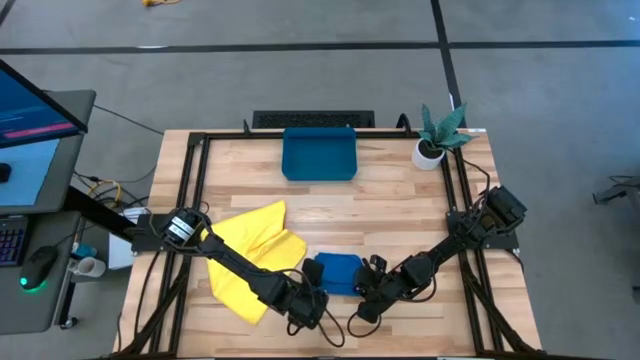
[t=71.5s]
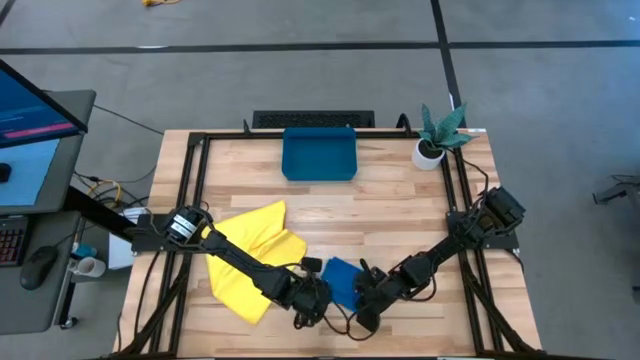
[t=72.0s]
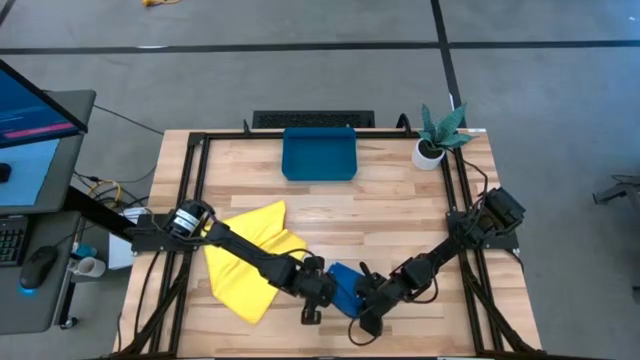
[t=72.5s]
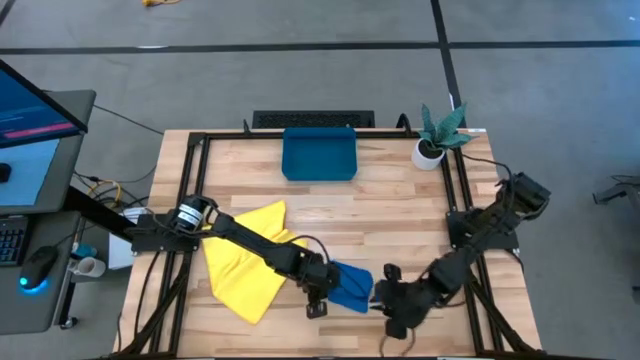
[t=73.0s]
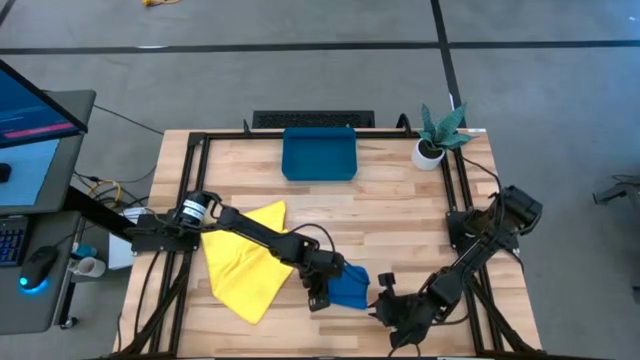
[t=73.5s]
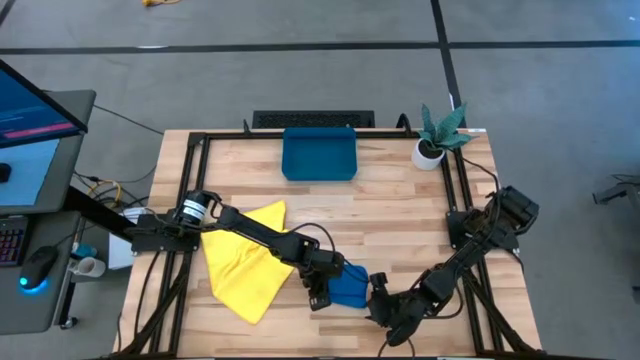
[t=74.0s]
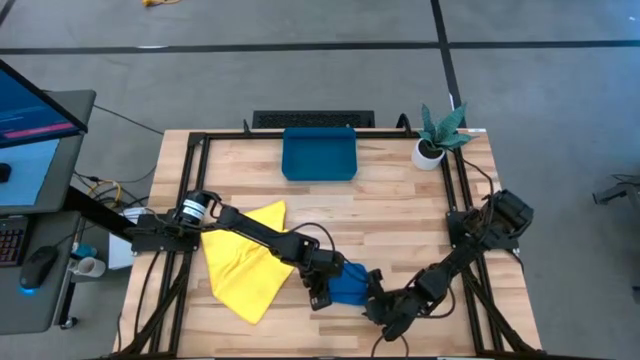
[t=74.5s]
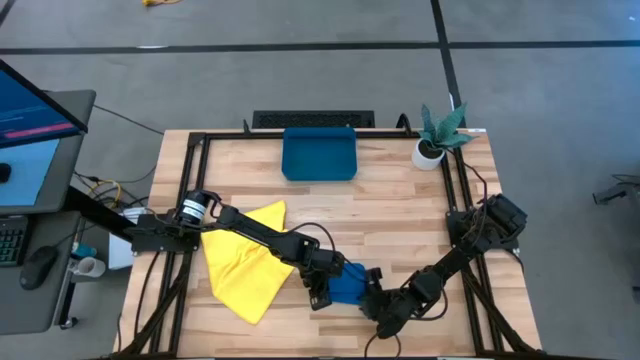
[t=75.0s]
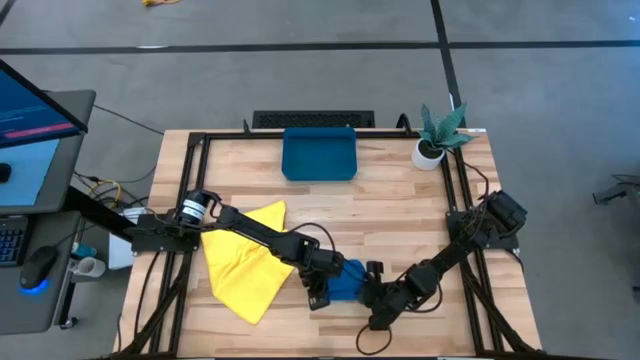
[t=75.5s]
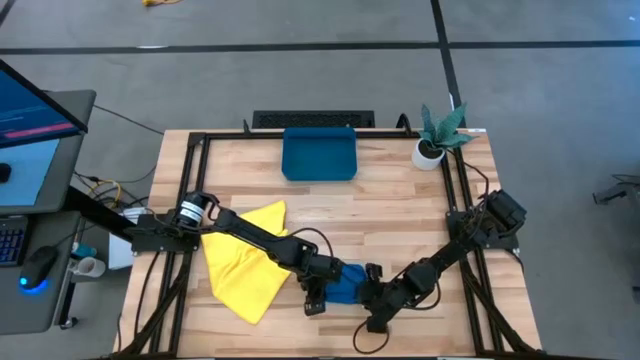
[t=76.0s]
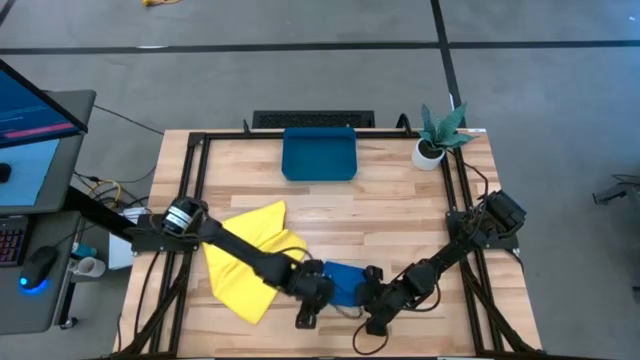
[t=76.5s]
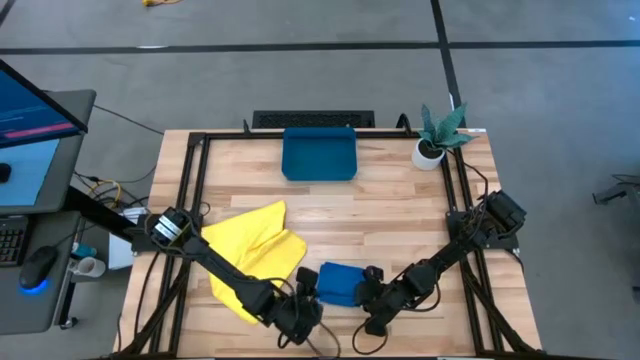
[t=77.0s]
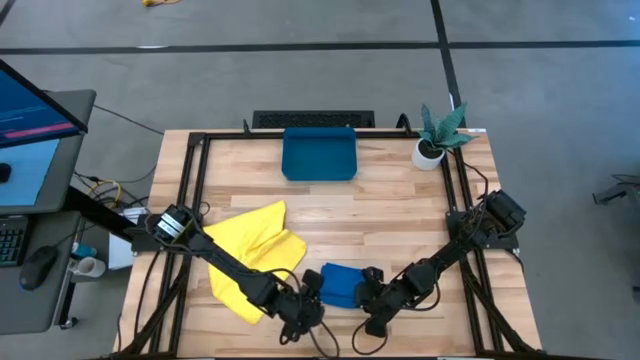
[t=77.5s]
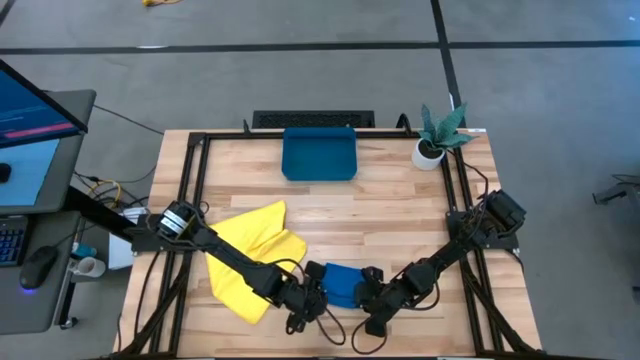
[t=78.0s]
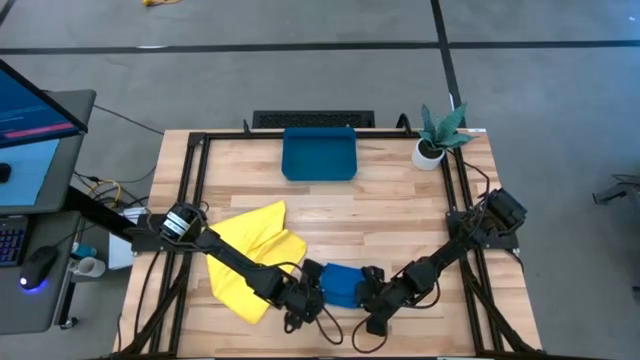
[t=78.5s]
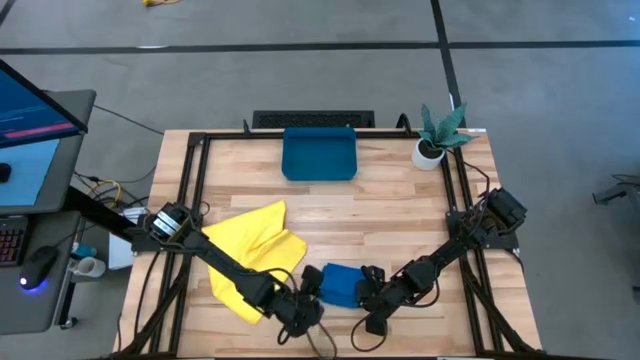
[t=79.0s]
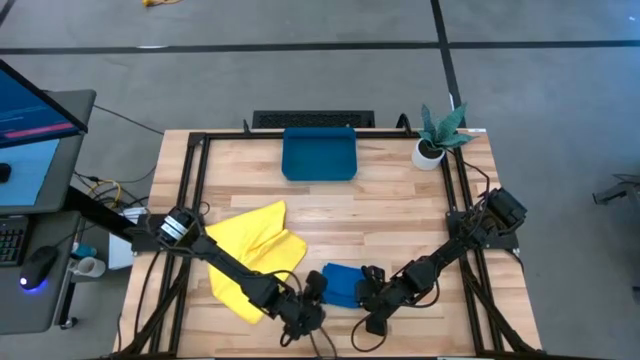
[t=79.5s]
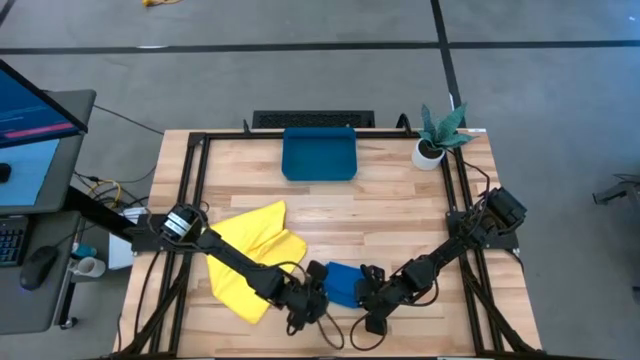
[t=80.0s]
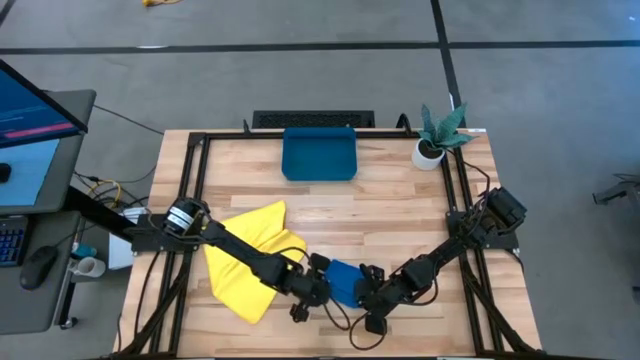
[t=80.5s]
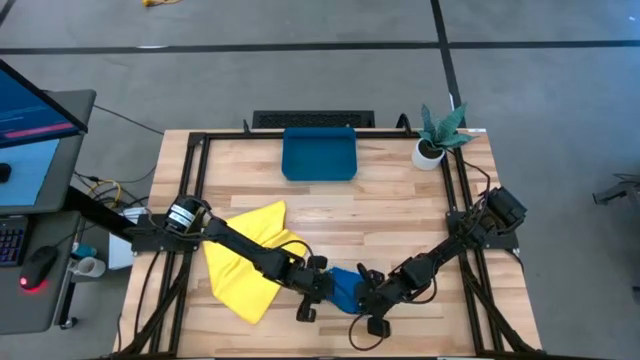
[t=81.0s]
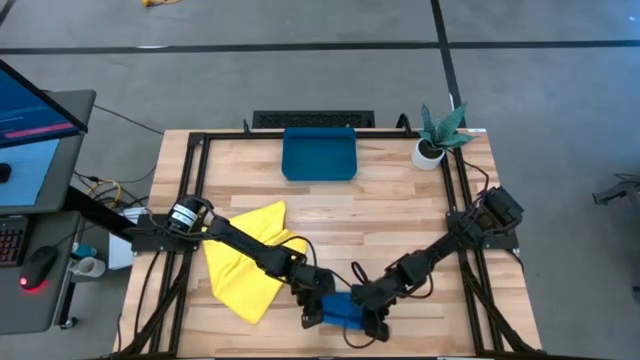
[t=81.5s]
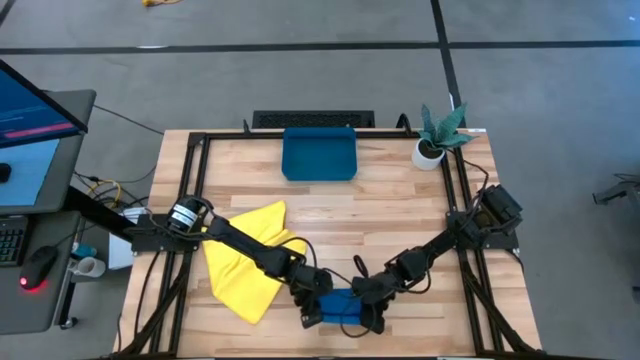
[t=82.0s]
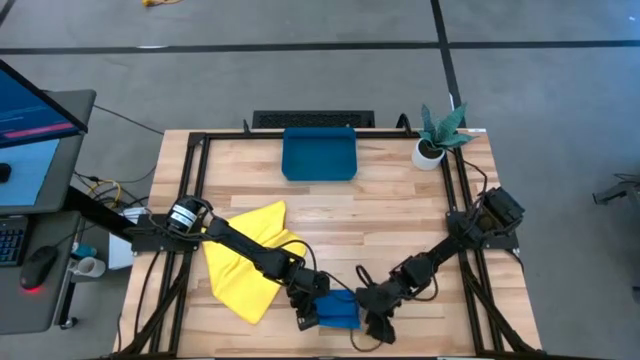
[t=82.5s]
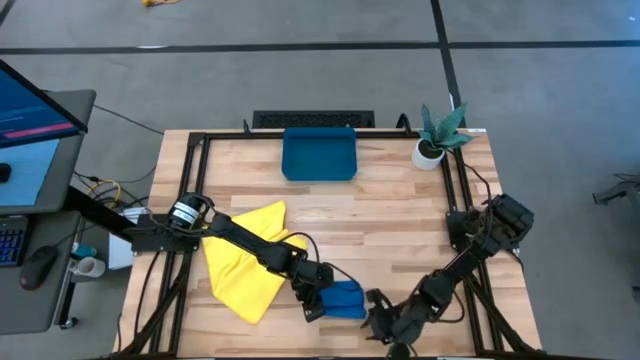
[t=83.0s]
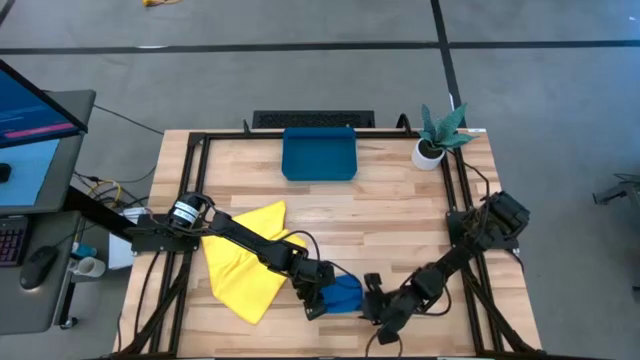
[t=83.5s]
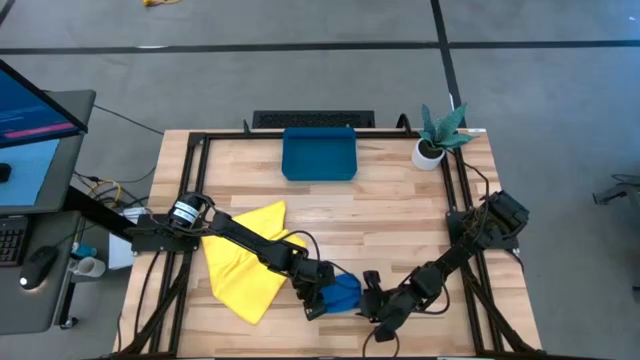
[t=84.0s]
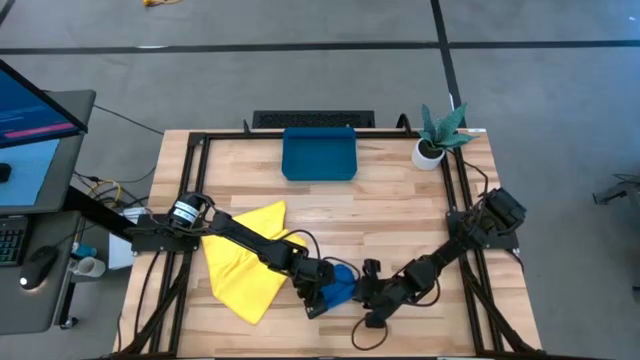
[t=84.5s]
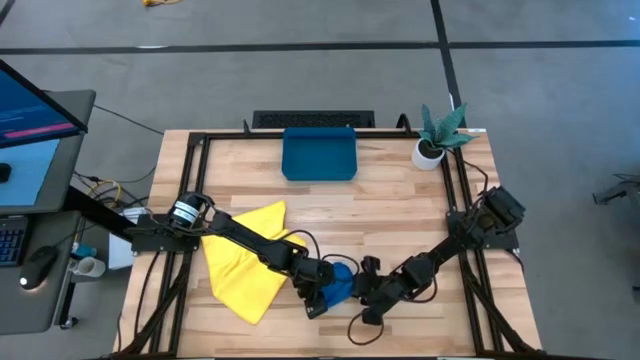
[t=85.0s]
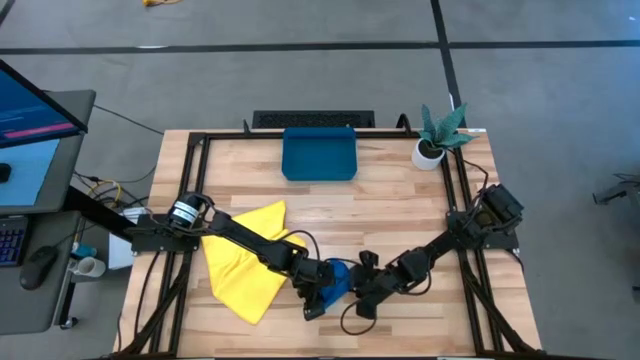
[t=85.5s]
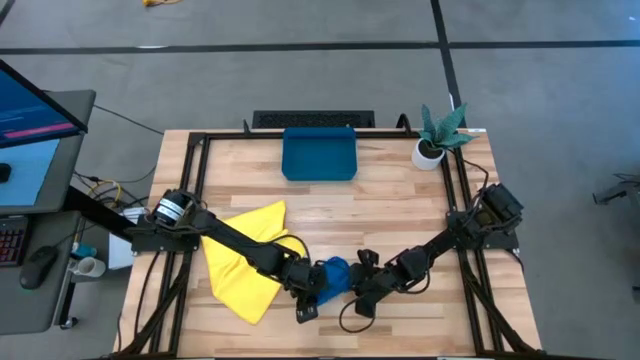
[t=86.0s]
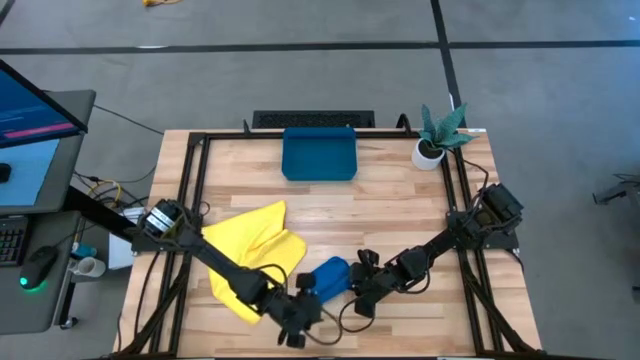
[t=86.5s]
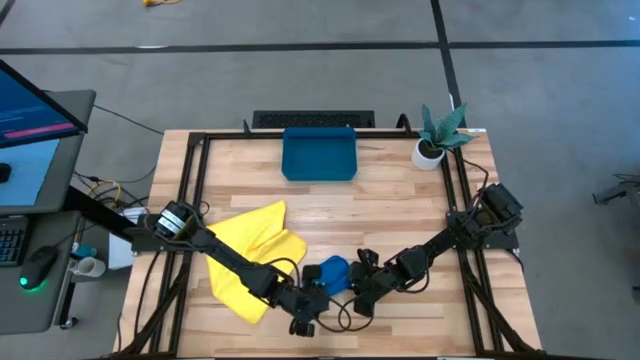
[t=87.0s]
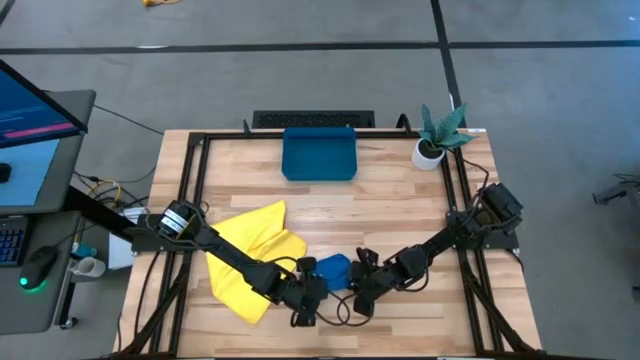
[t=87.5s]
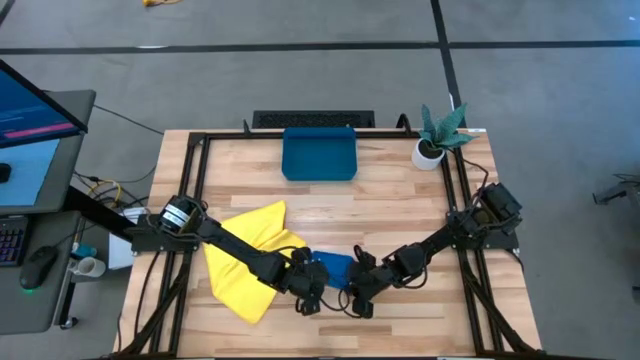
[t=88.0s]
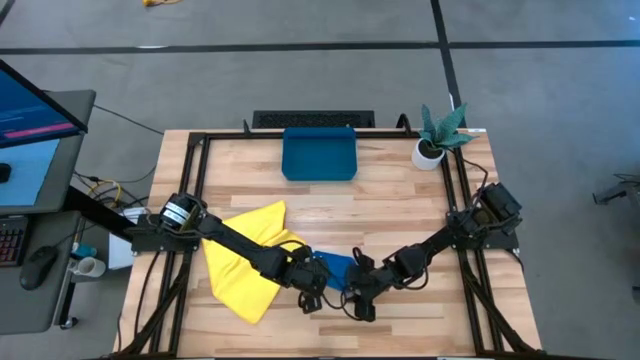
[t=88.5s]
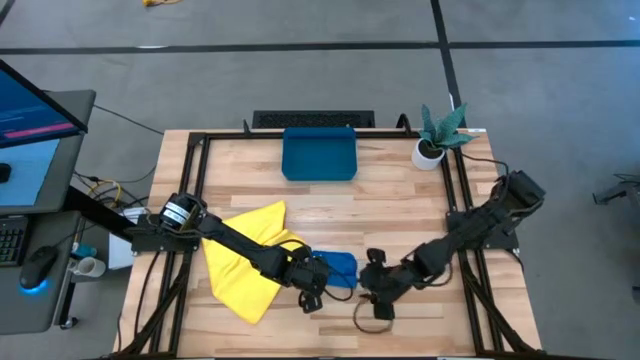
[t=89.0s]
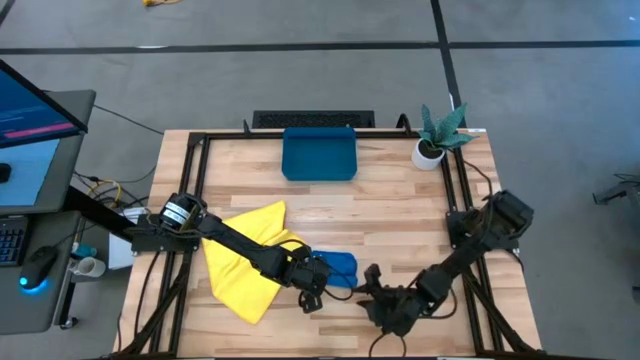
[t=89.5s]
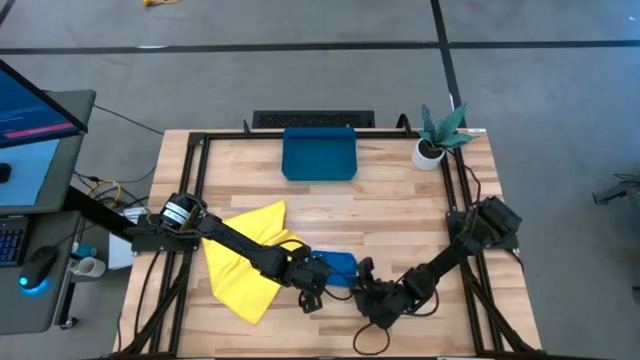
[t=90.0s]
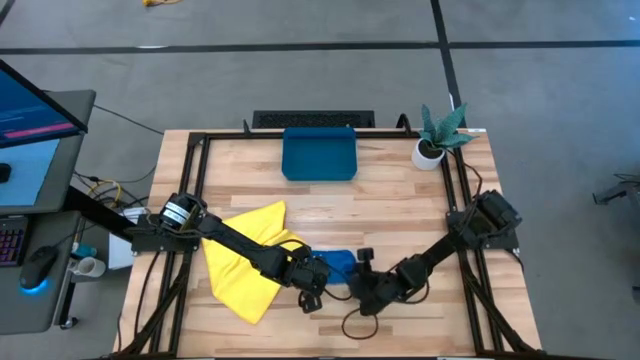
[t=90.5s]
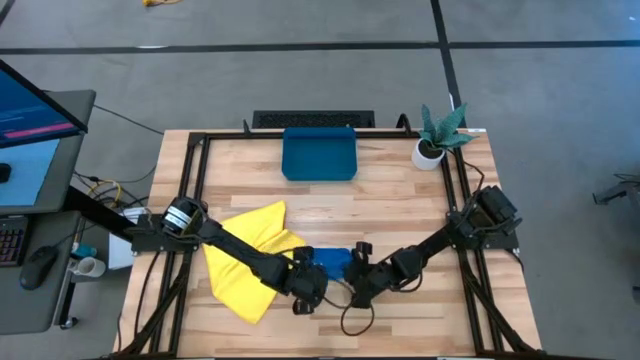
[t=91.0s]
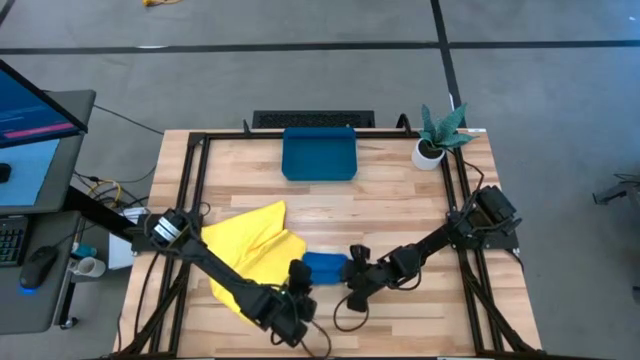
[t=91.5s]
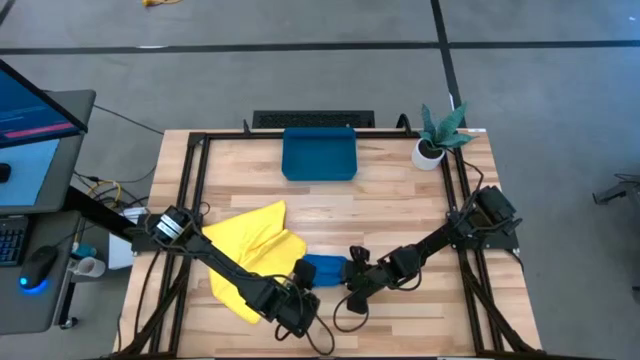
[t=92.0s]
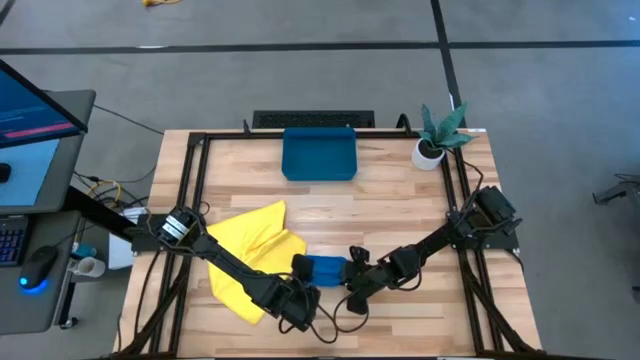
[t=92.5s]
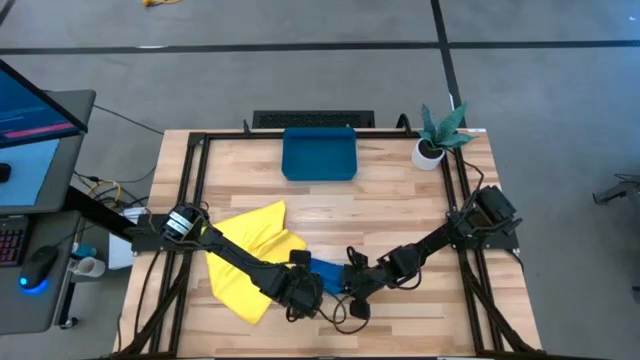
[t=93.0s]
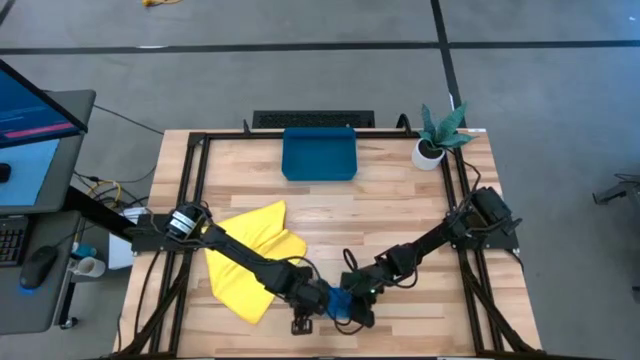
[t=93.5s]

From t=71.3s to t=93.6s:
Task: Roll microfiber towels into tight, uniform cylinder then place into a basket
Roll the blue microfiber cloth
